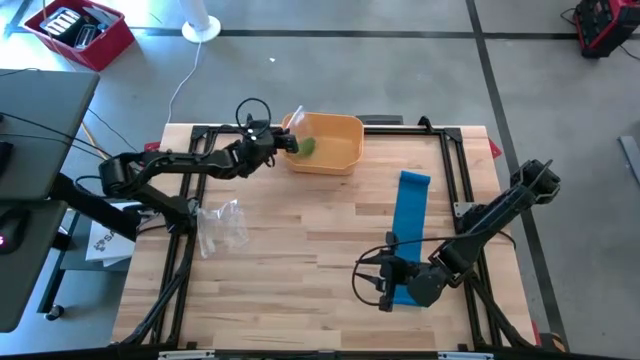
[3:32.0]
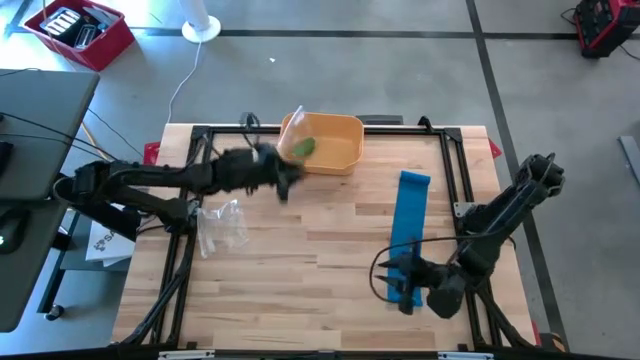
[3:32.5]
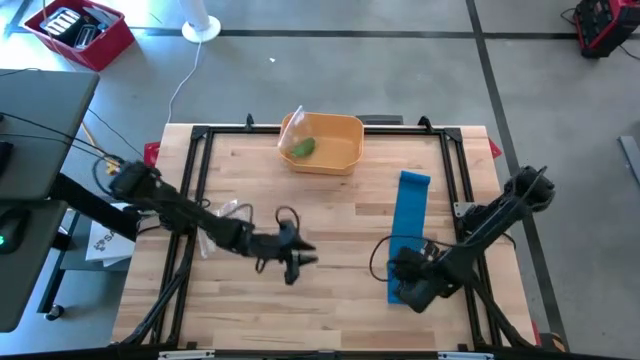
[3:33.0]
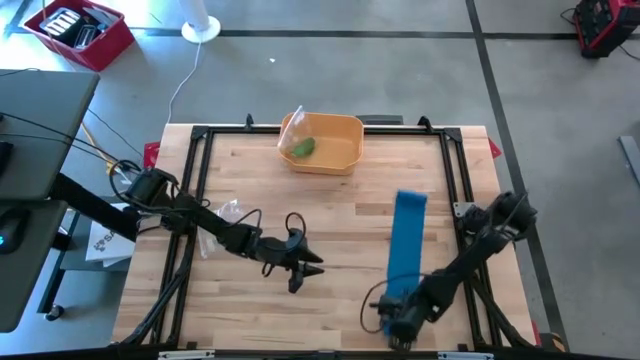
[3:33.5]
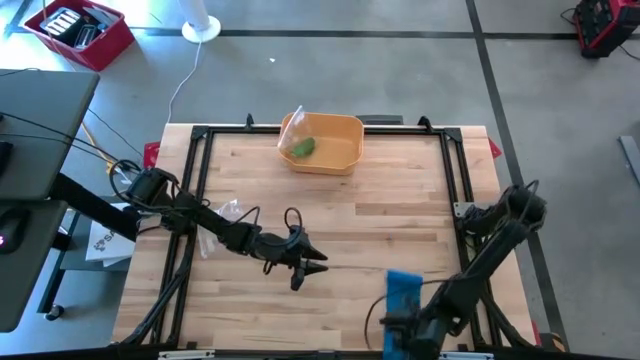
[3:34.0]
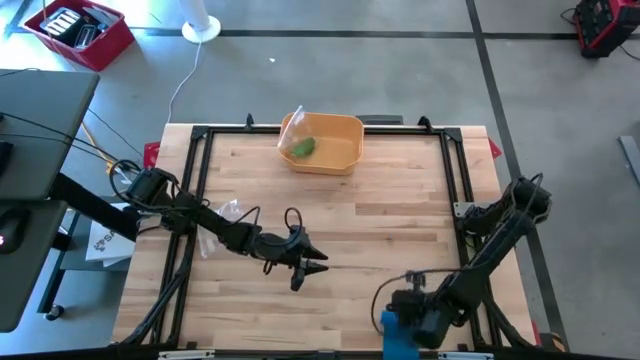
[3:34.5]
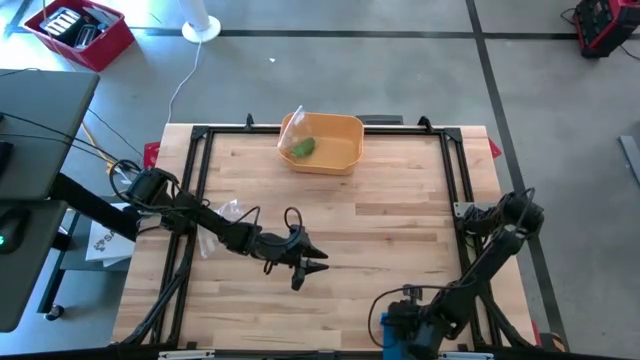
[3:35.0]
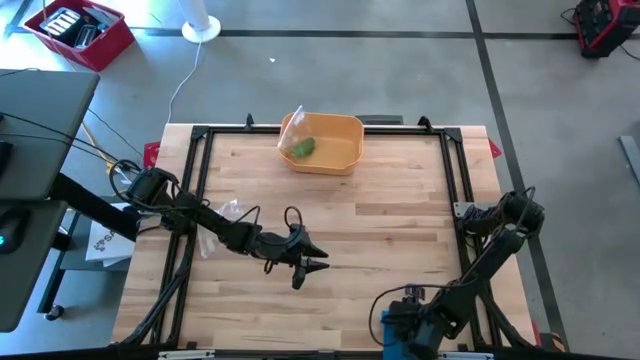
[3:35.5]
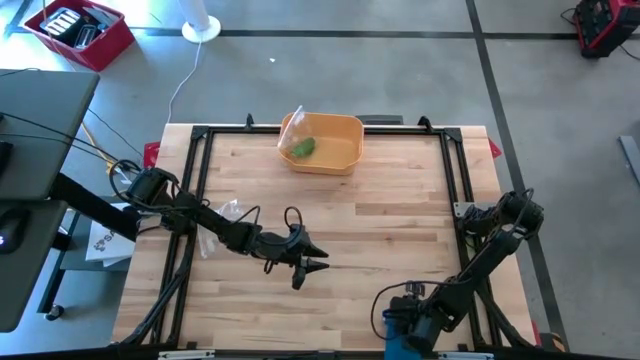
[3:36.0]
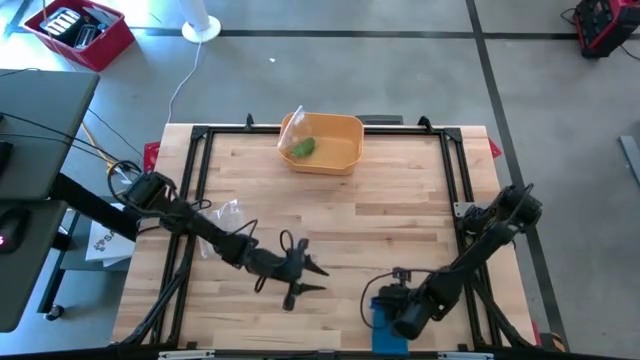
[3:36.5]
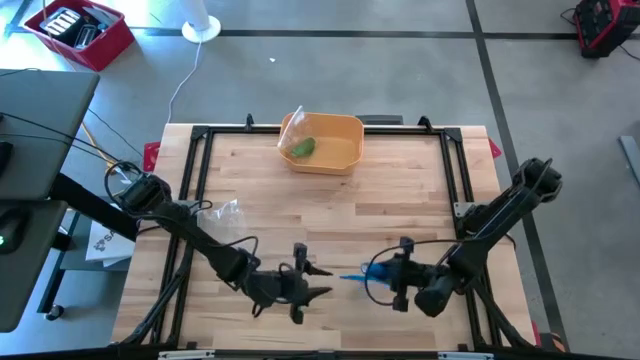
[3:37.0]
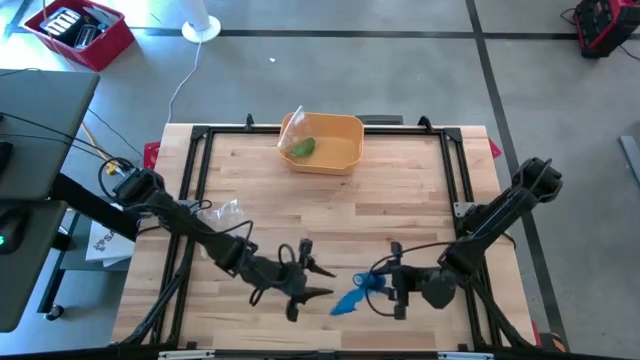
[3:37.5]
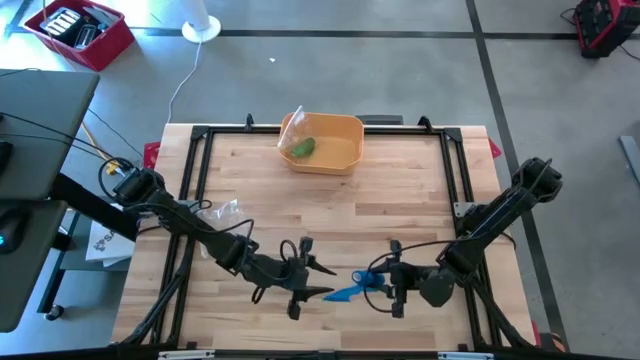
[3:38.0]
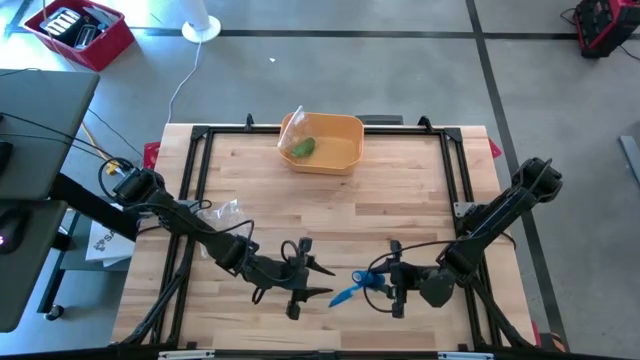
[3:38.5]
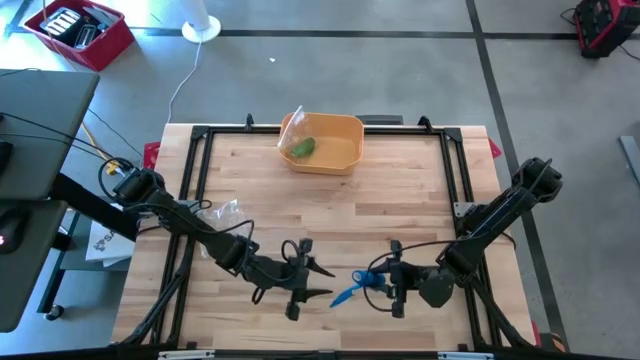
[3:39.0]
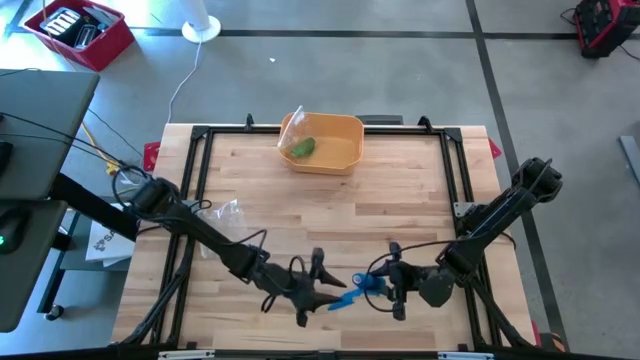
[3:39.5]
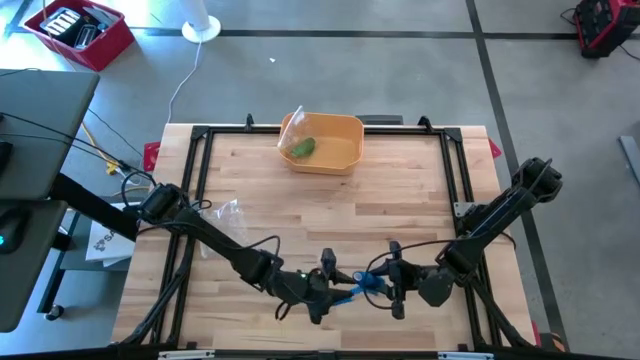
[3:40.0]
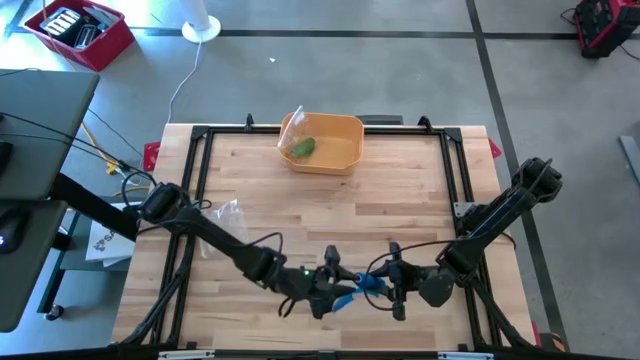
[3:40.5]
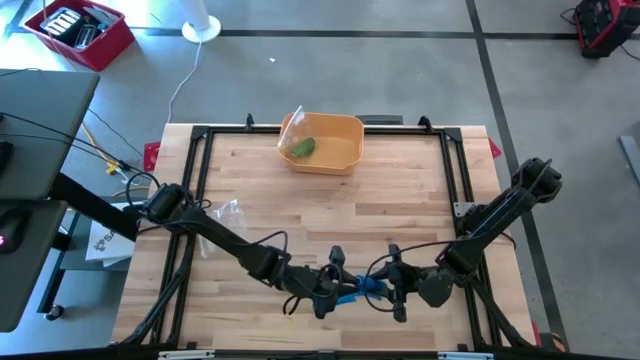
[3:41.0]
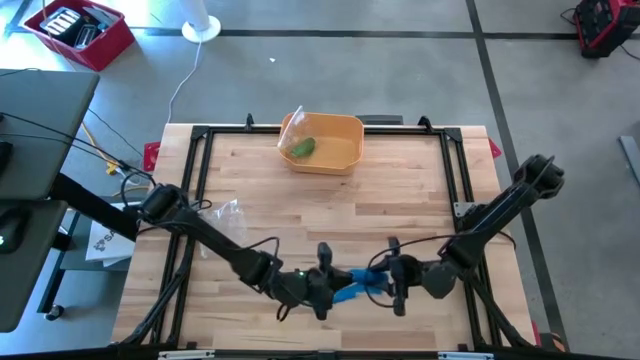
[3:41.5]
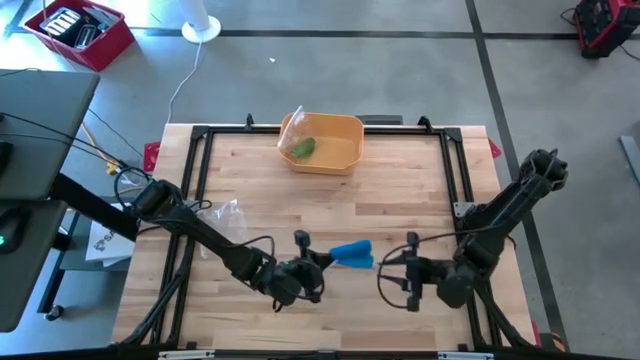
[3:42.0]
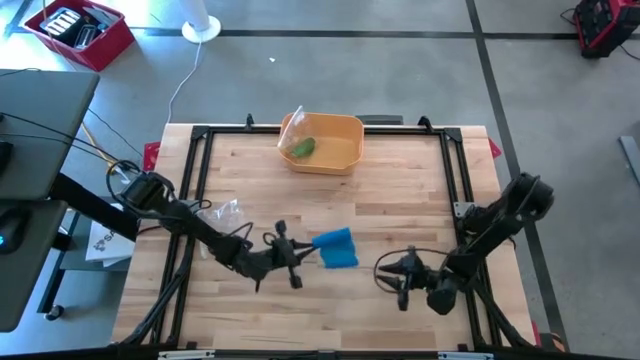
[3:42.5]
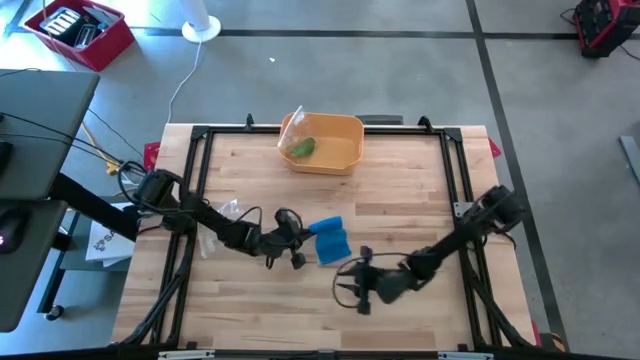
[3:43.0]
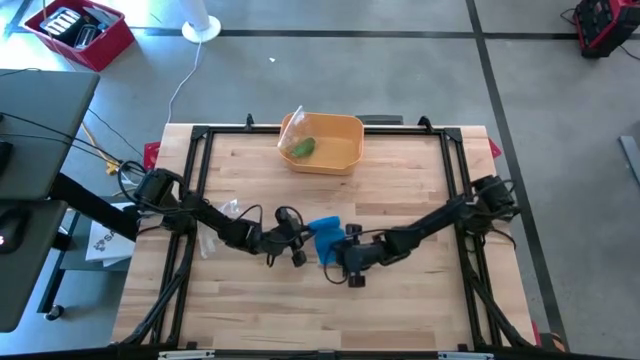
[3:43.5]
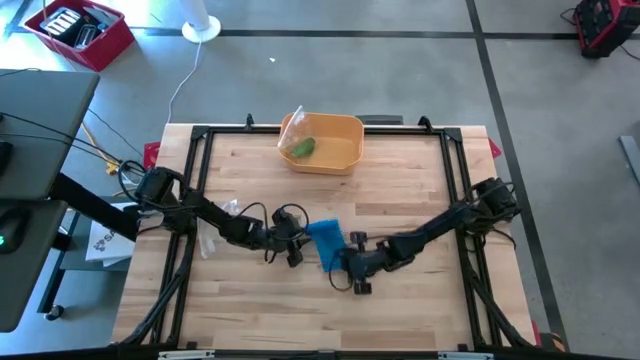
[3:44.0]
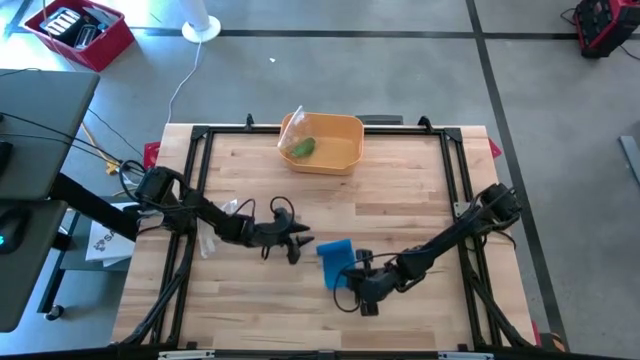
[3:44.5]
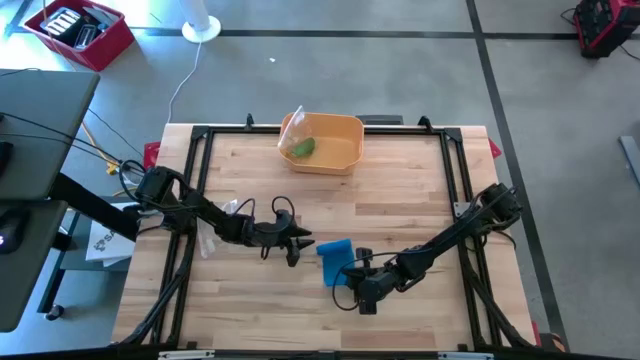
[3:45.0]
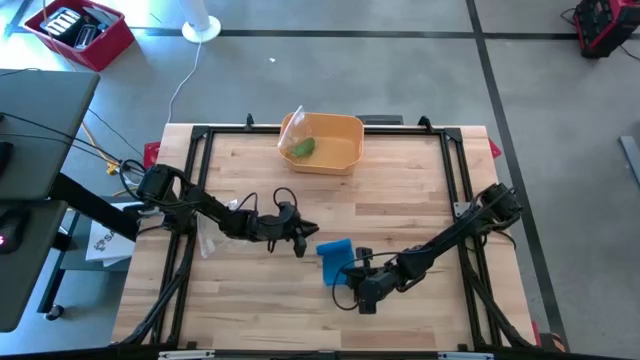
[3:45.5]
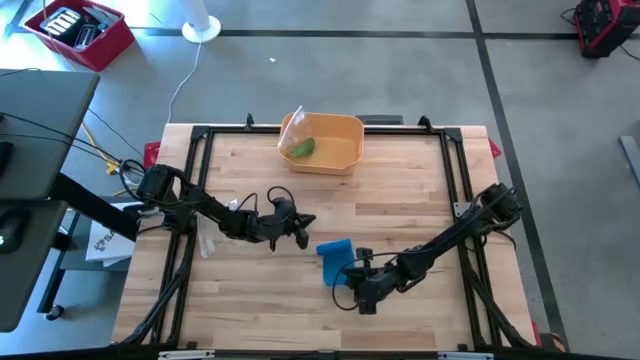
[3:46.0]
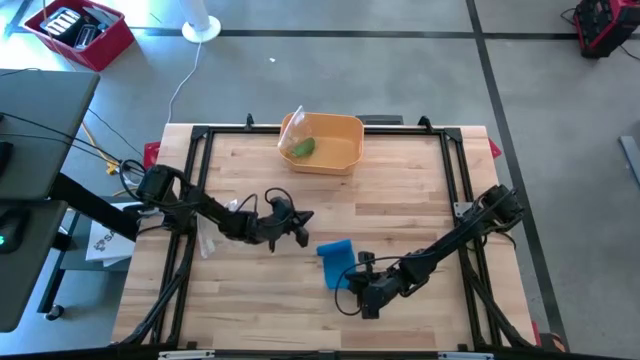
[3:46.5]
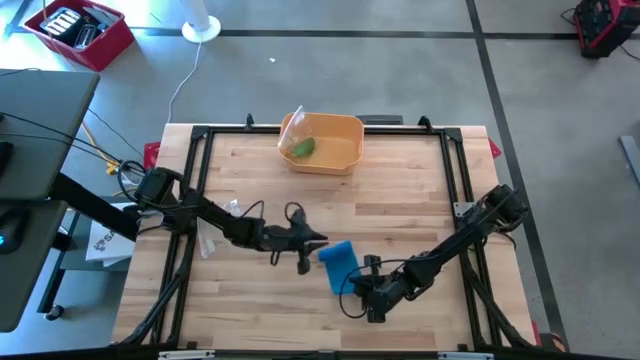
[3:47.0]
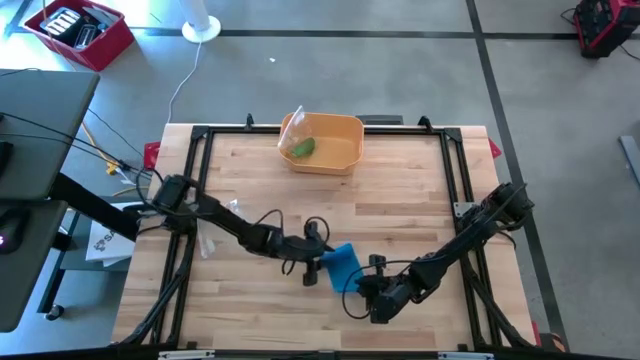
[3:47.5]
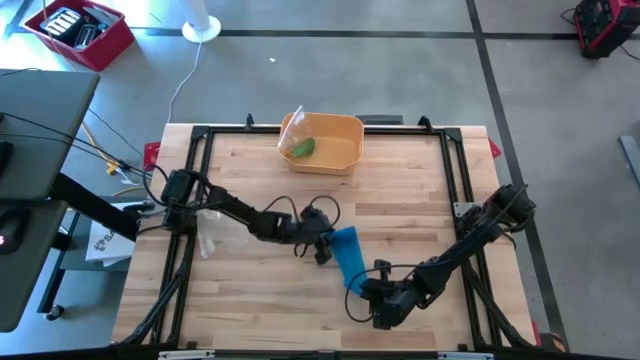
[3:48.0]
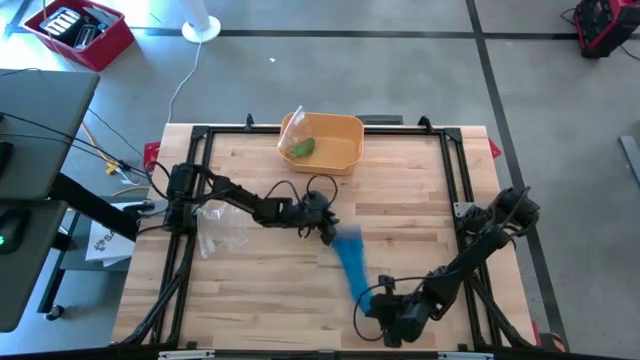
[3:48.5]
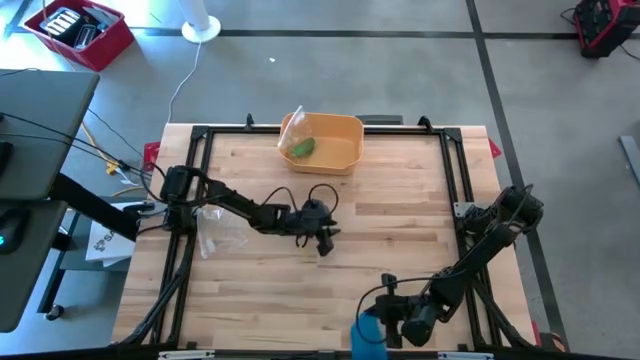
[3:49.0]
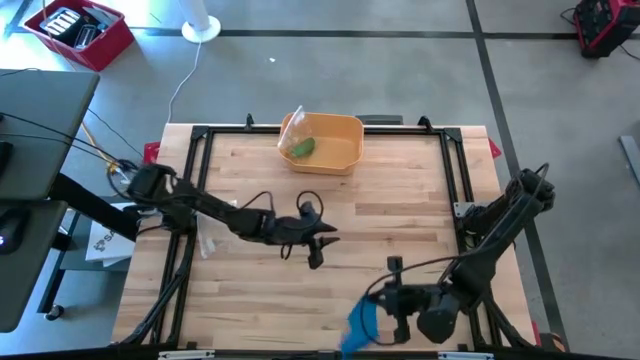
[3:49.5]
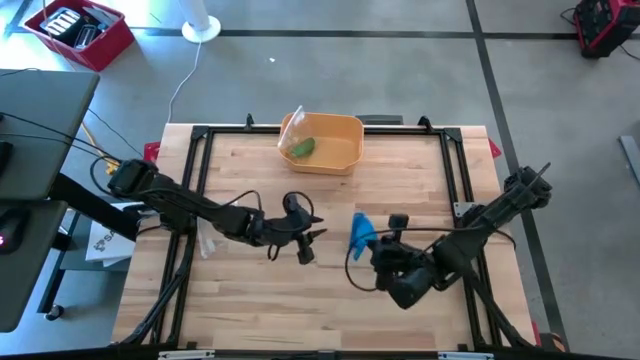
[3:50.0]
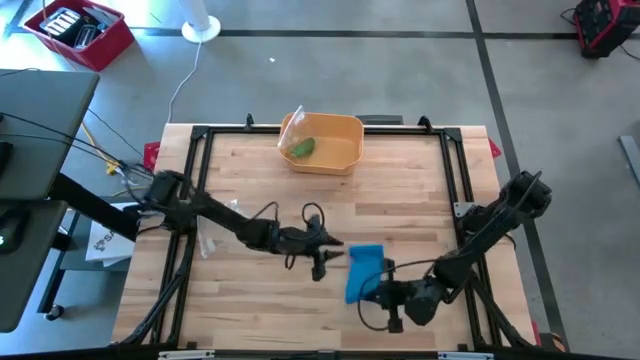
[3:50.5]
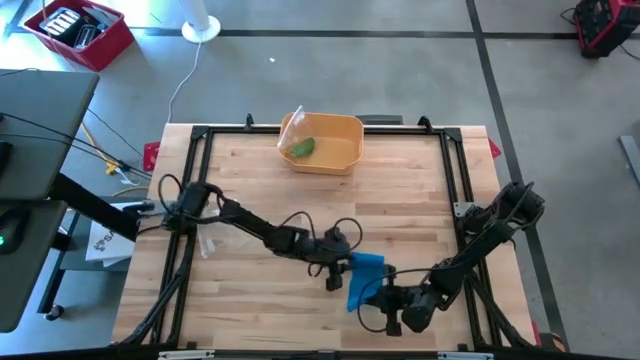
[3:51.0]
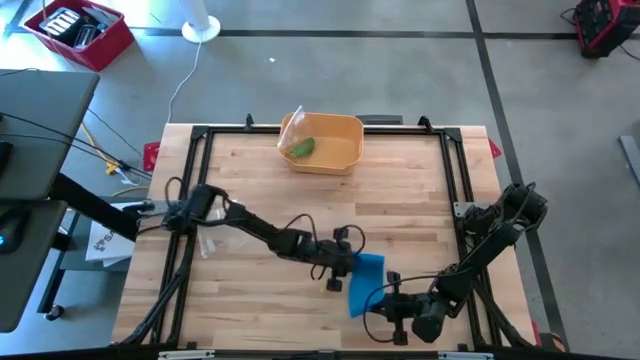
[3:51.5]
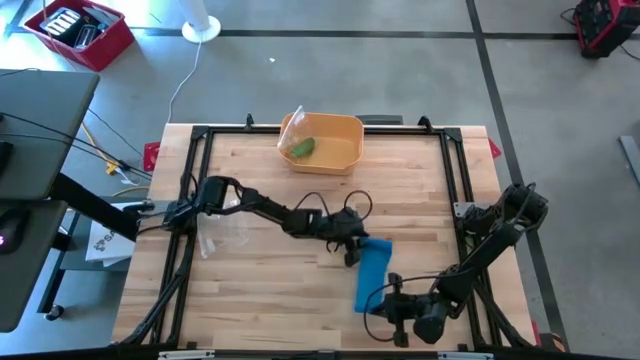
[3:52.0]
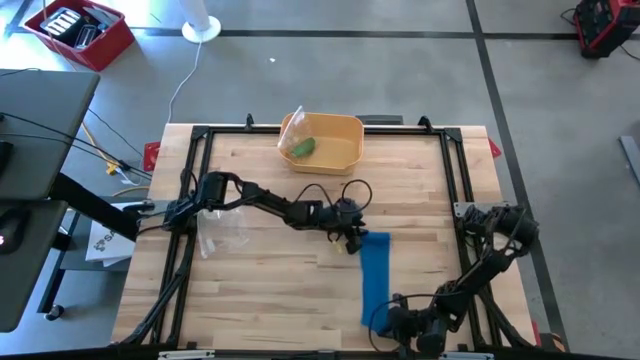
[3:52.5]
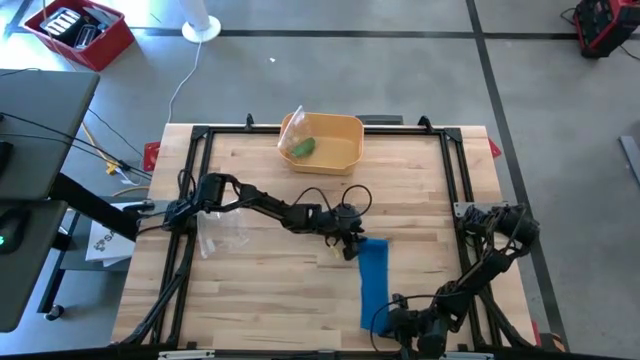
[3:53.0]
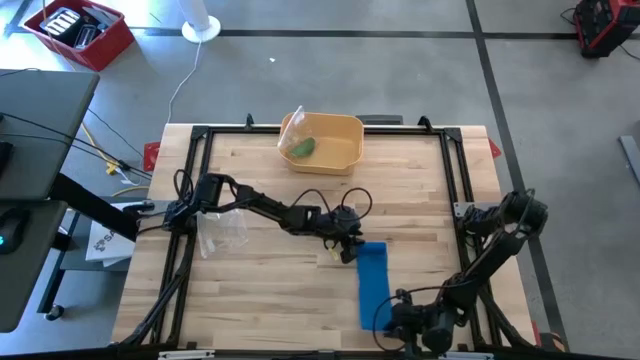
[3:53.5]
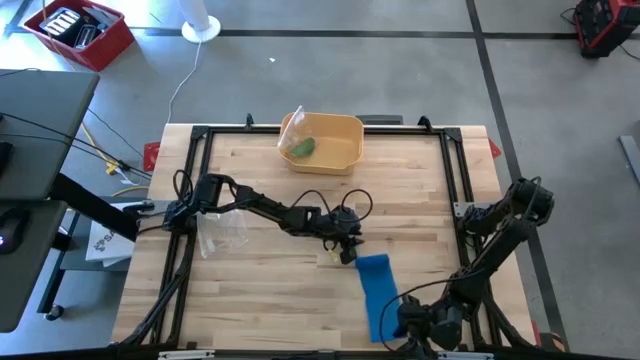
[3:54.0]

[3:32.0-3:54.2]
Task: Roll bandage
Roll the blue bandage
